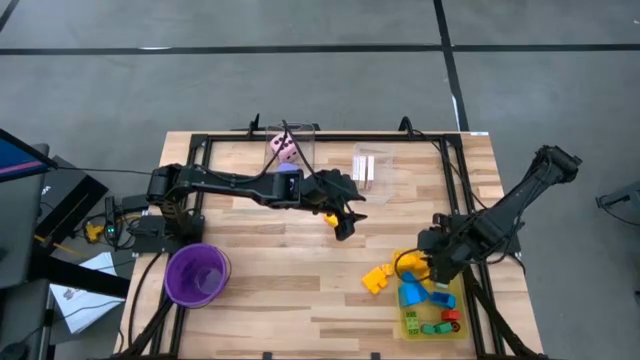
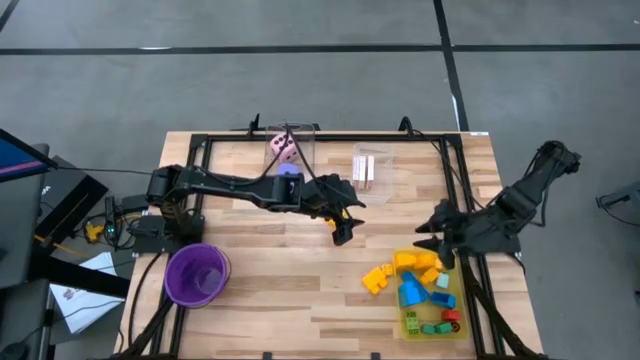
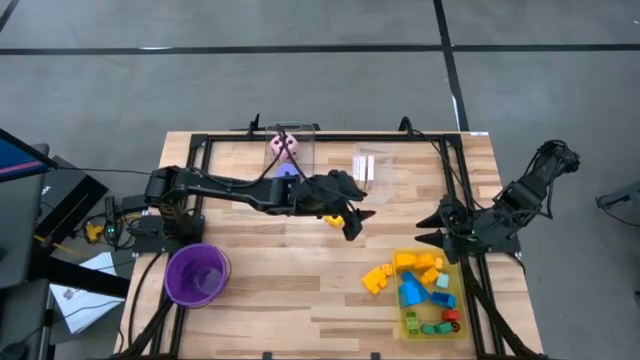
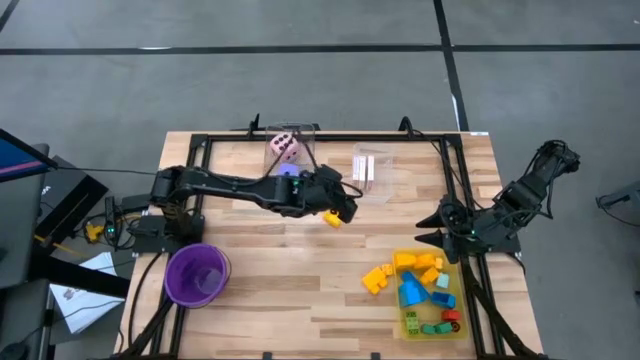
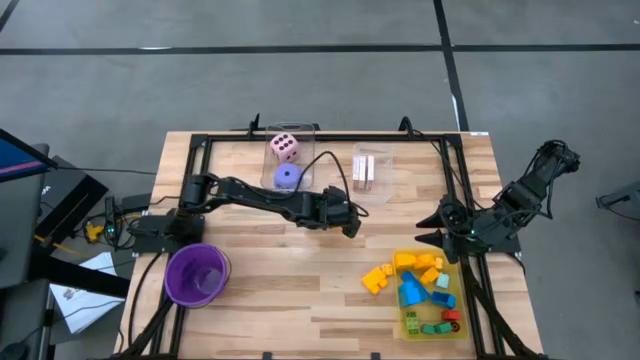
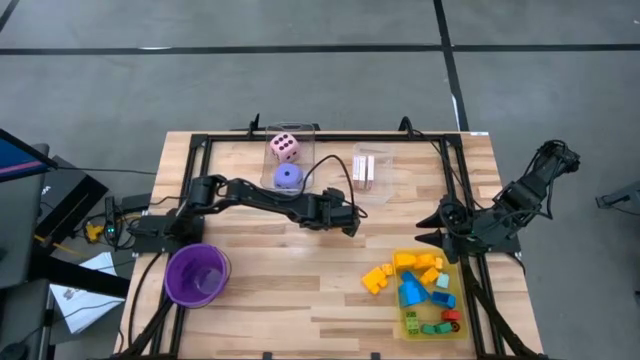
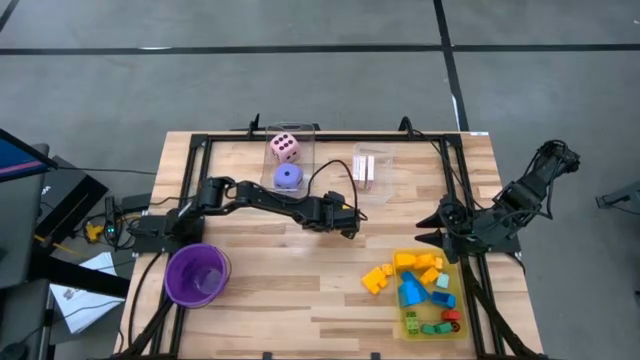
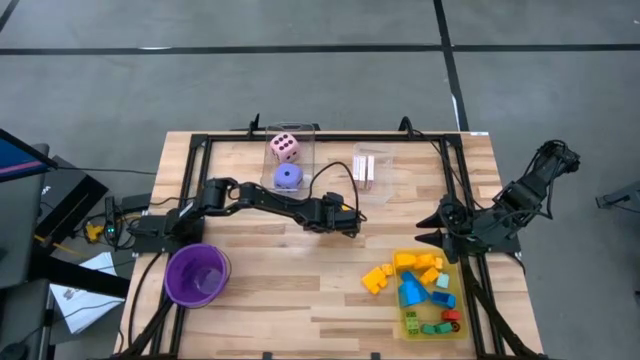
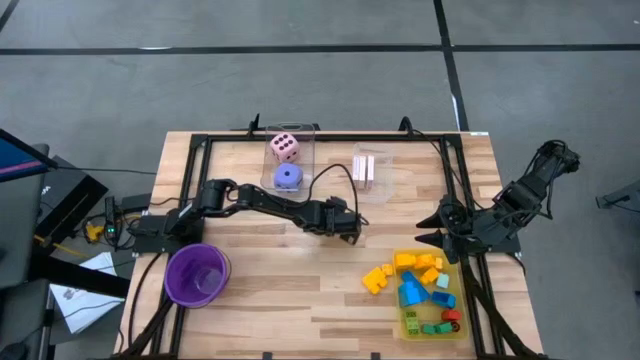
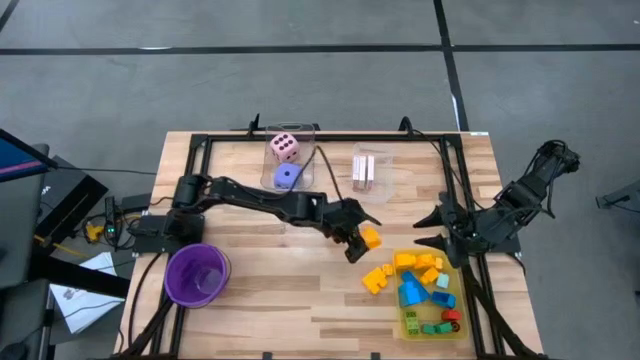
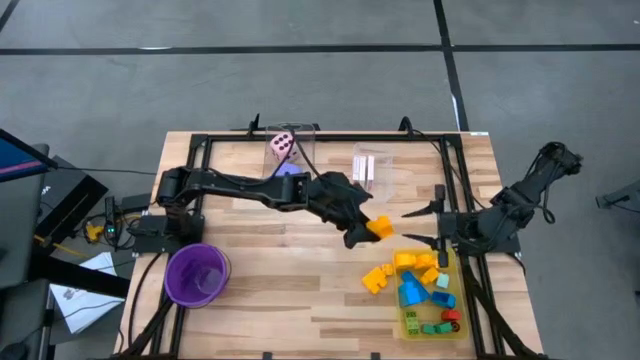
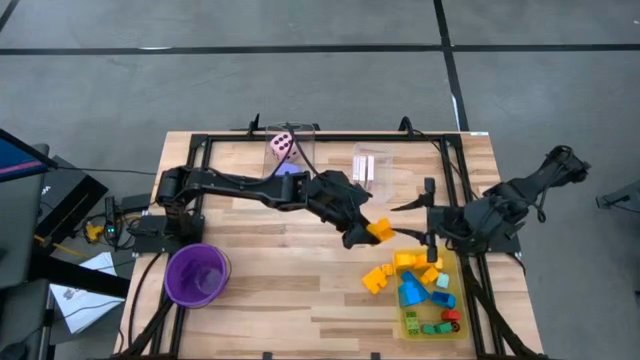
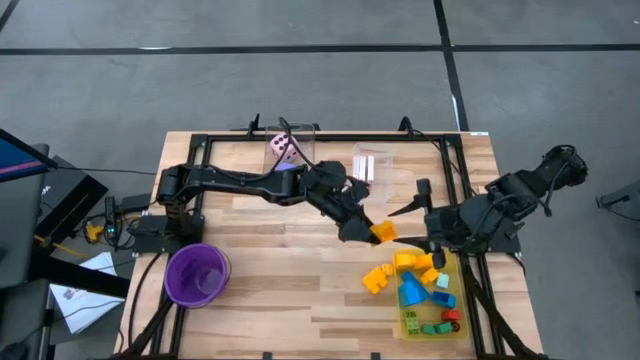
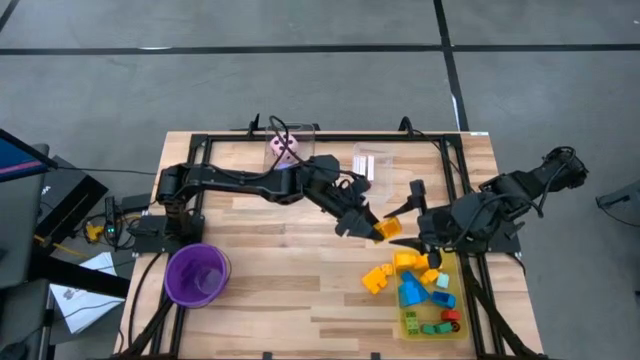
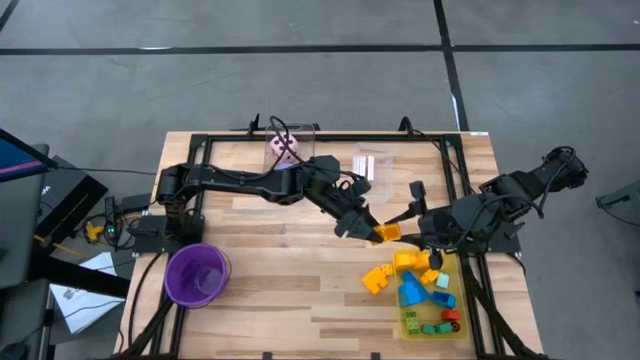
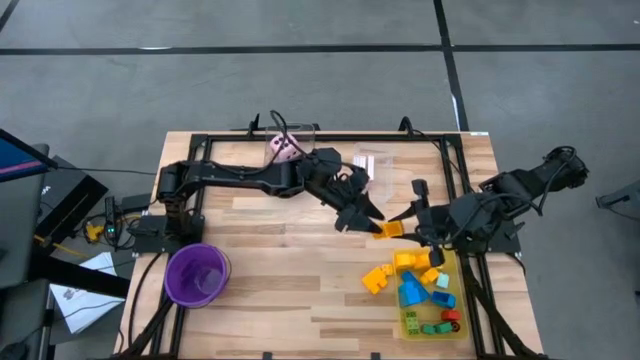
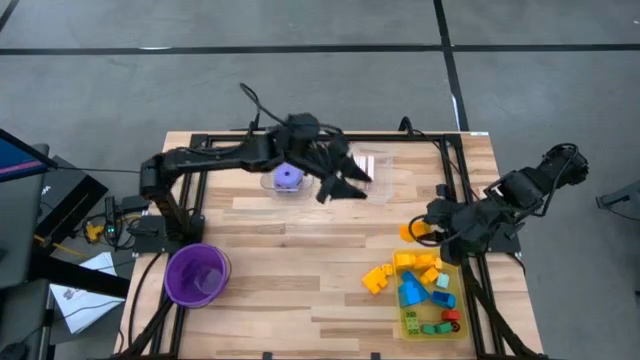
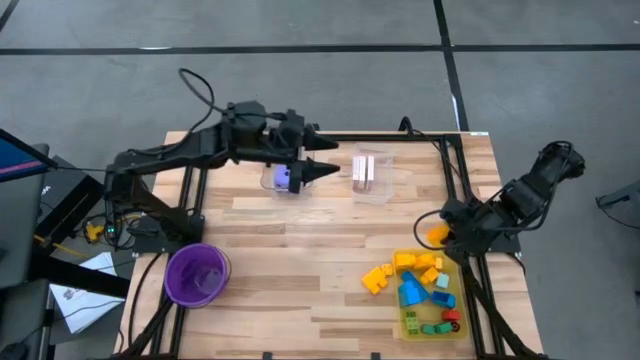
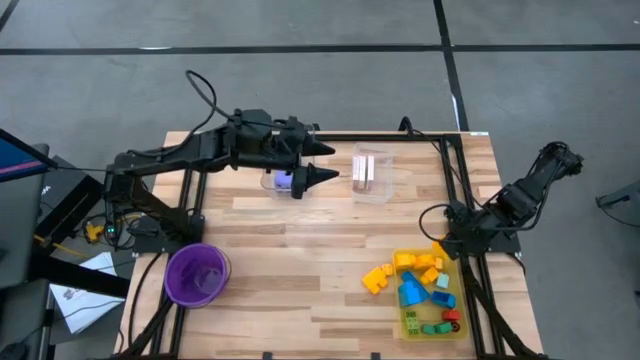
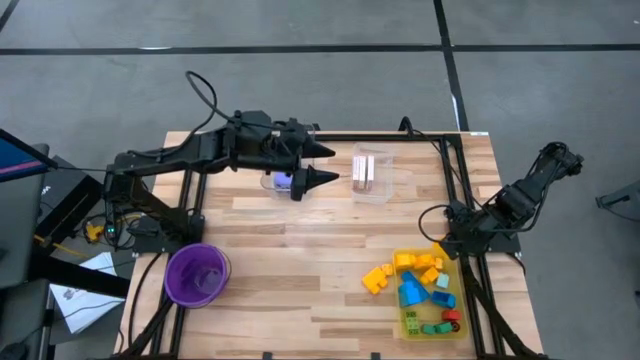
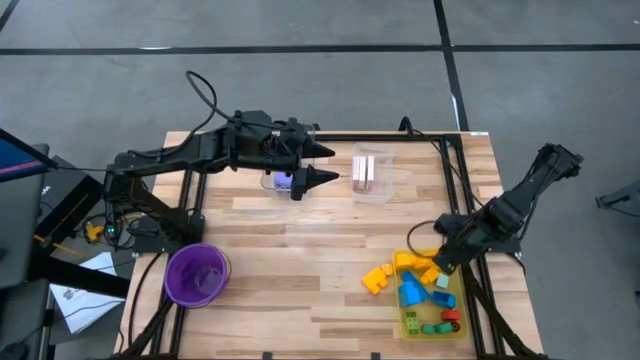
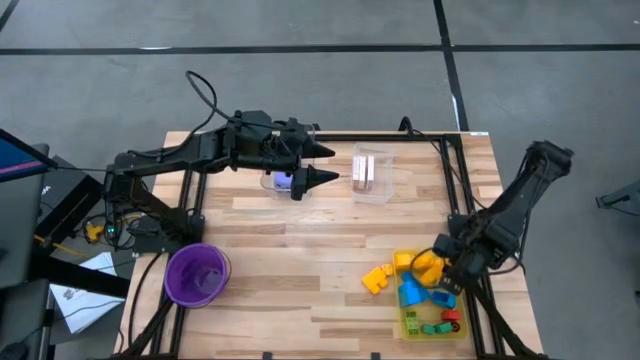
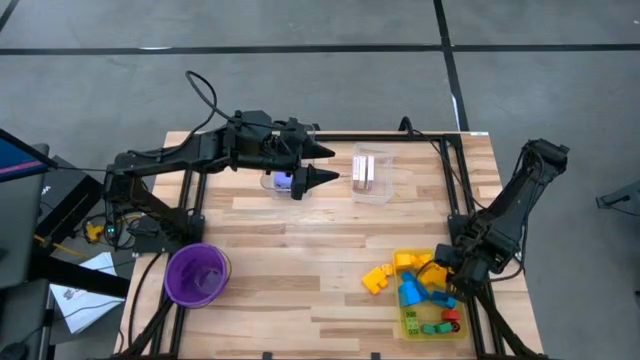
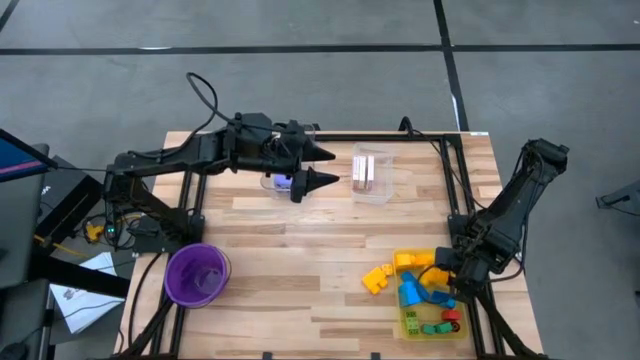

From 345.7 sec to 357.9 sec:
Task: Pick & Place Toys
Put the top yellow game piece into the bin

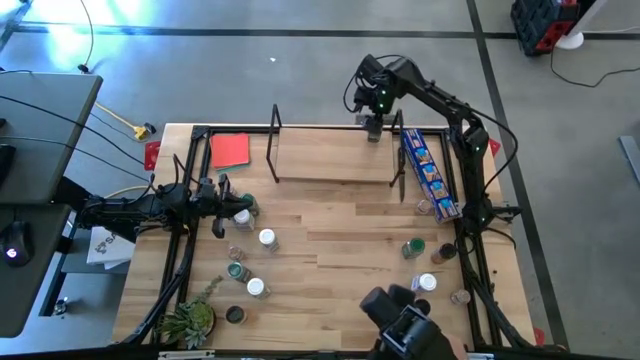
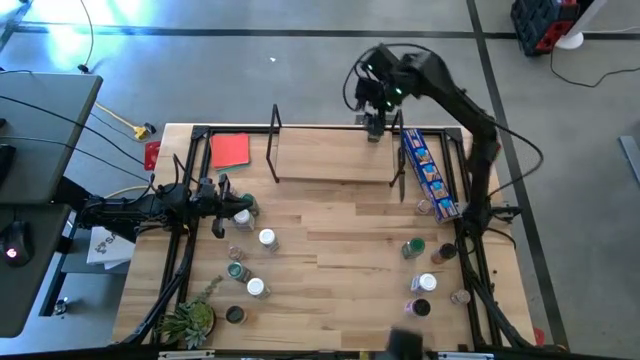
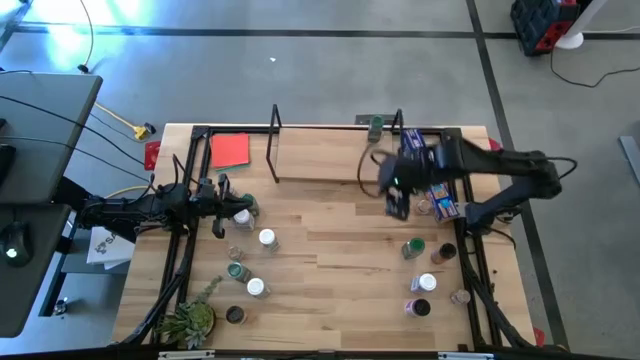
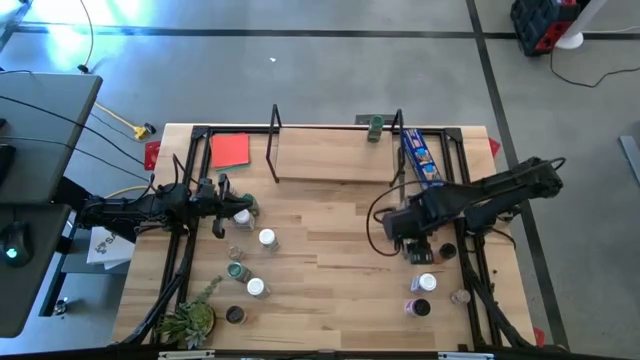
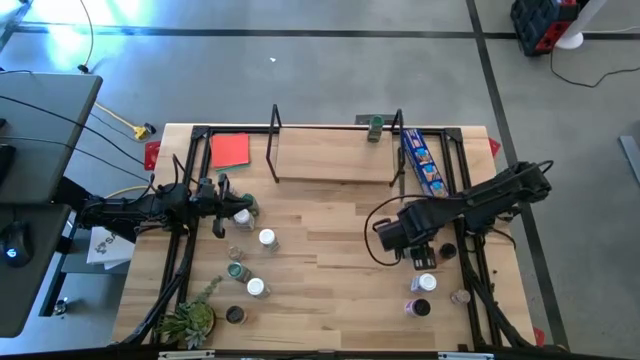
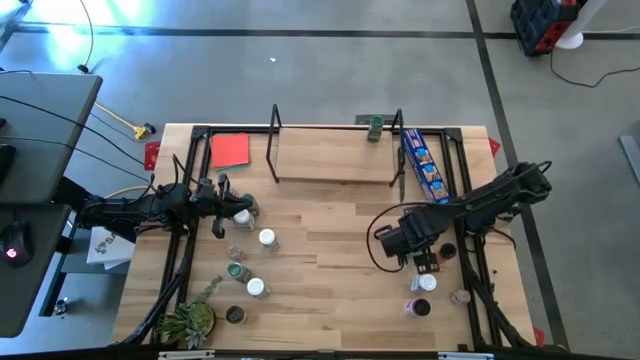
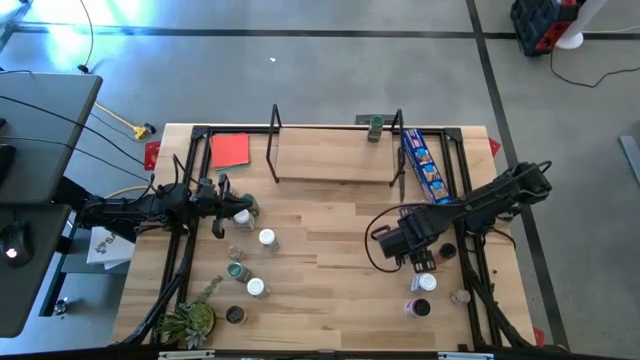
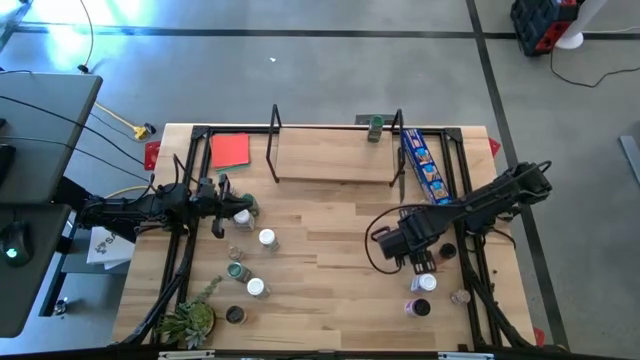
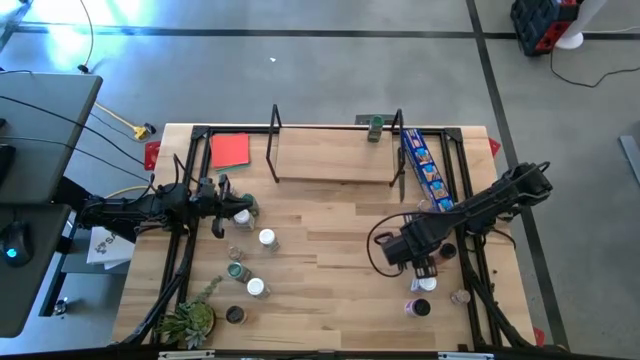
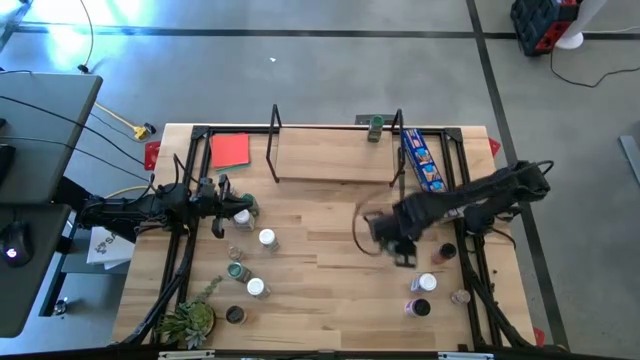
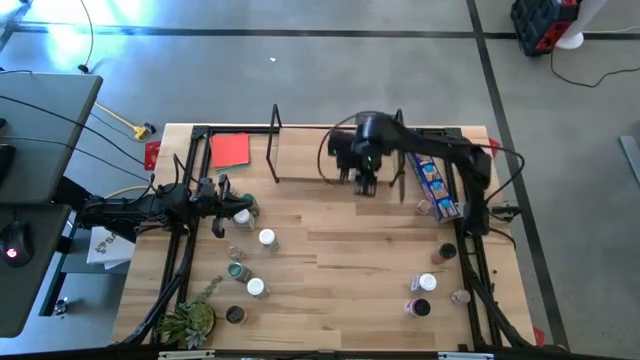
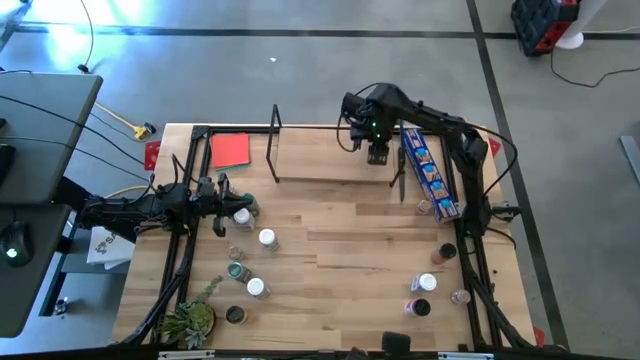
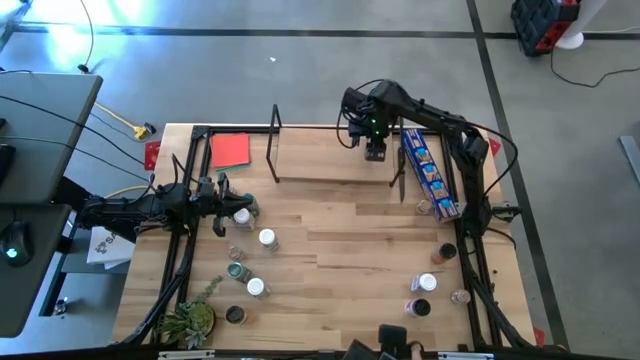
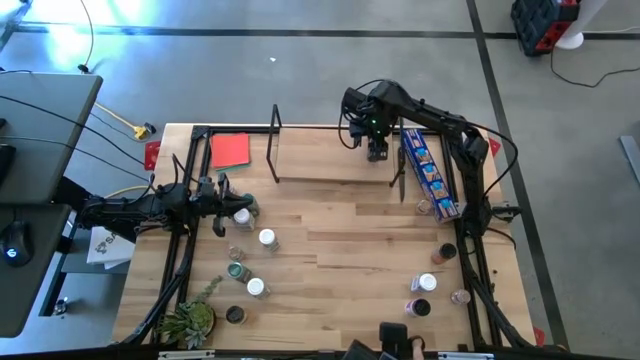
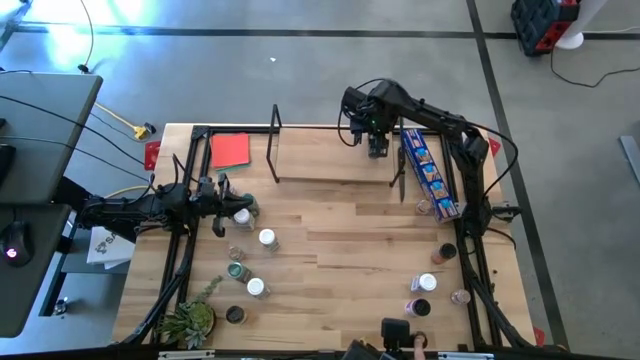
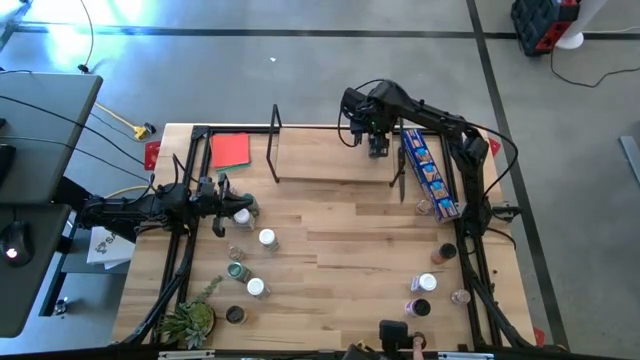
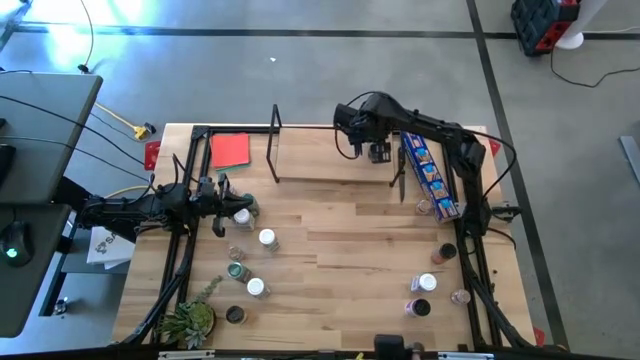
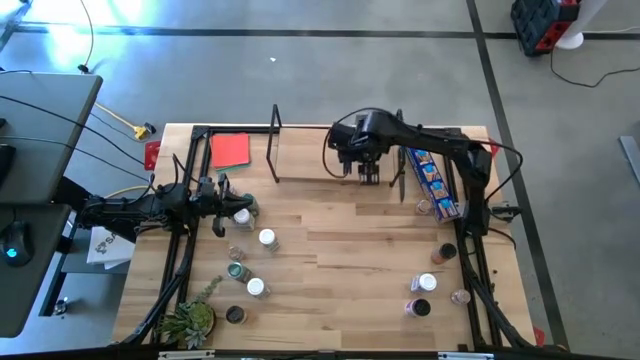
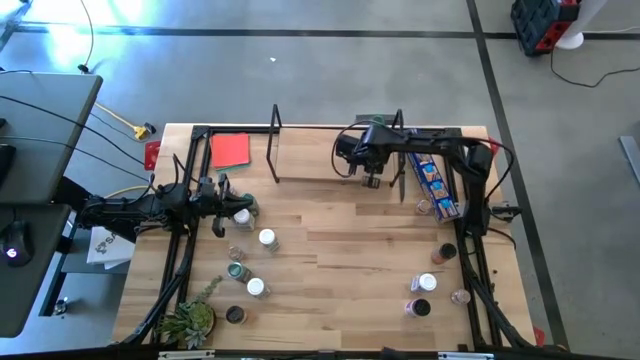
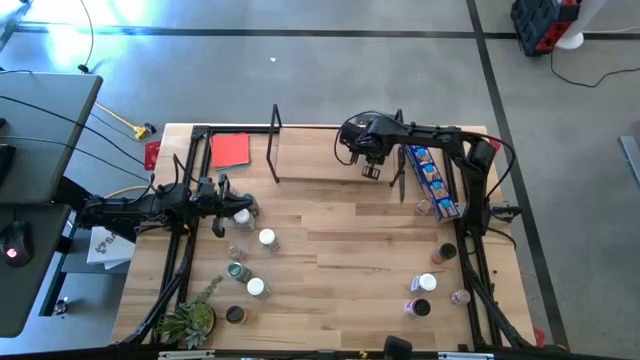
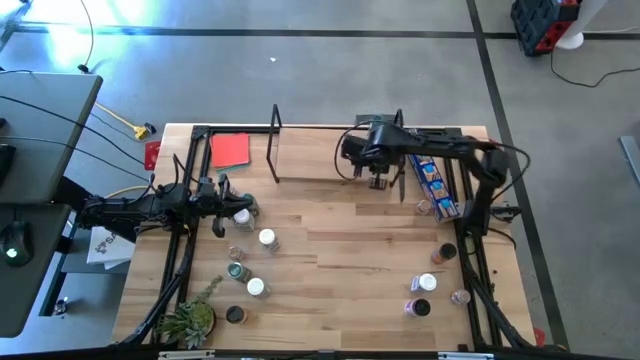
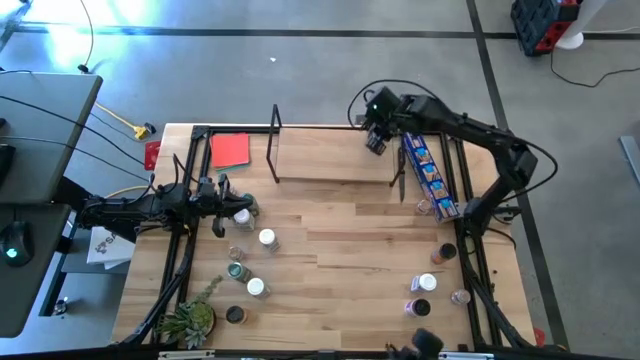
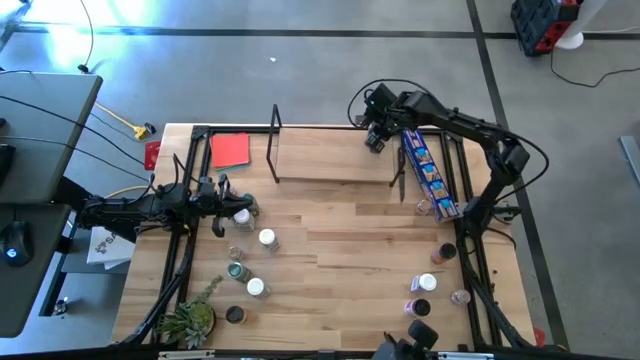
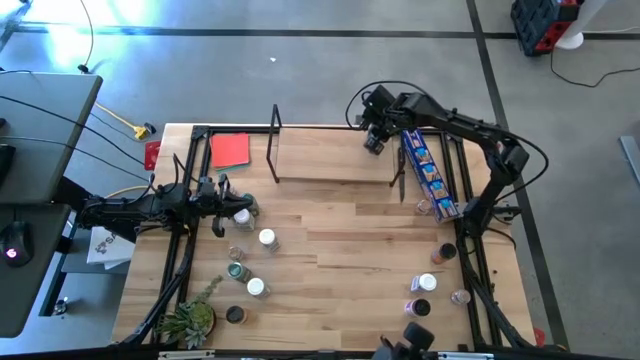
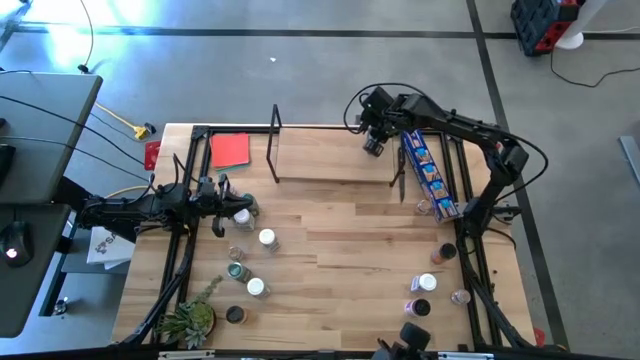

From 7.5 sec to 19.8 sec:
Task: Shelf spices
Put the middle right green seasoning bottle on the shelf aligned with the other green seasoning bottle
